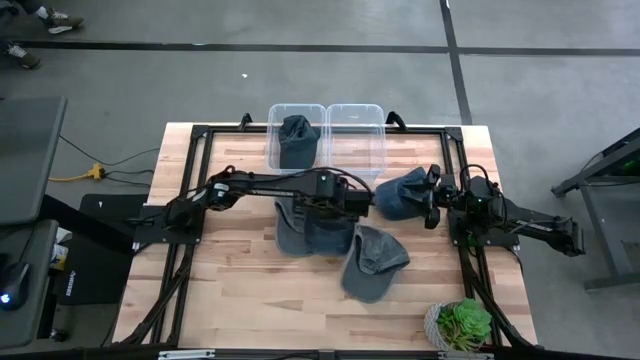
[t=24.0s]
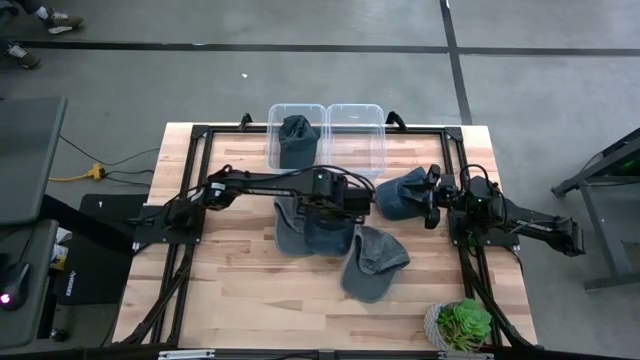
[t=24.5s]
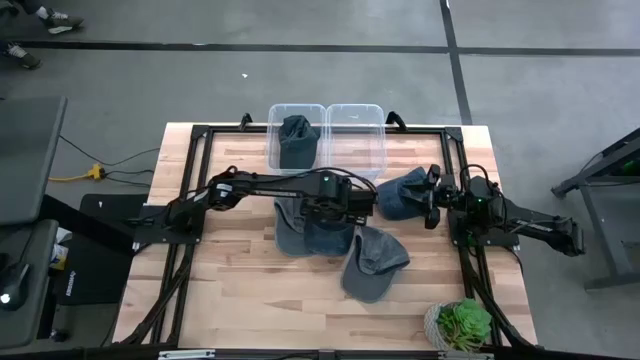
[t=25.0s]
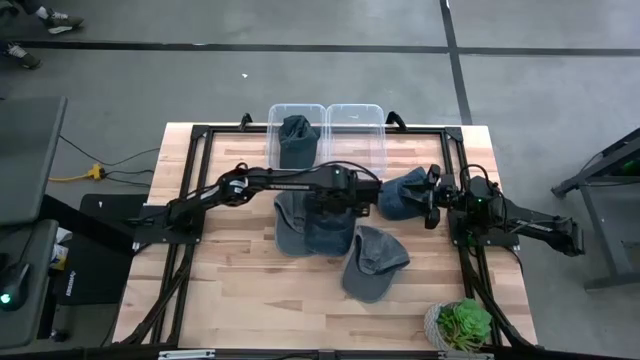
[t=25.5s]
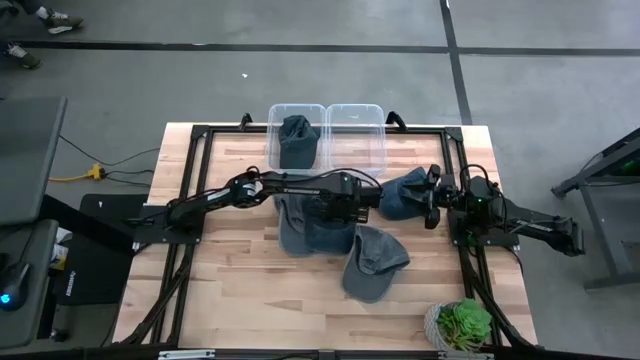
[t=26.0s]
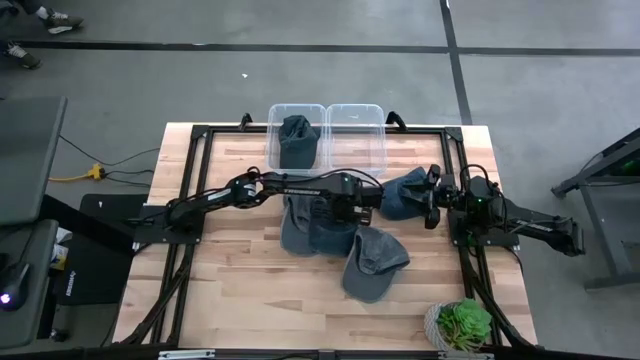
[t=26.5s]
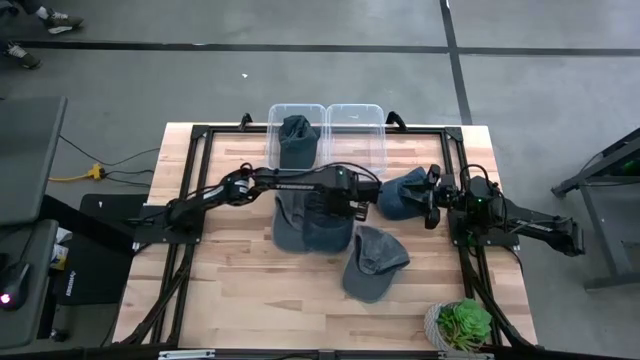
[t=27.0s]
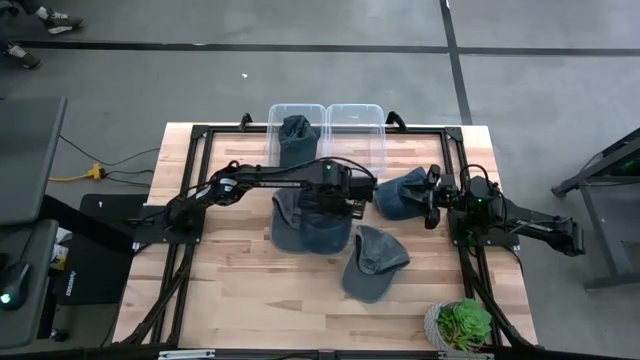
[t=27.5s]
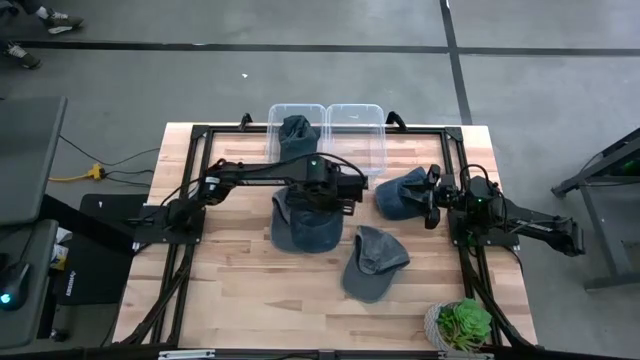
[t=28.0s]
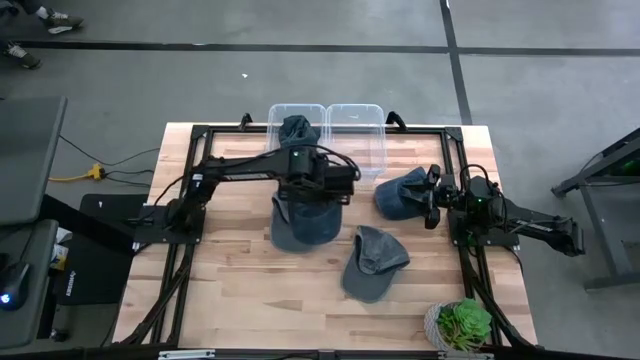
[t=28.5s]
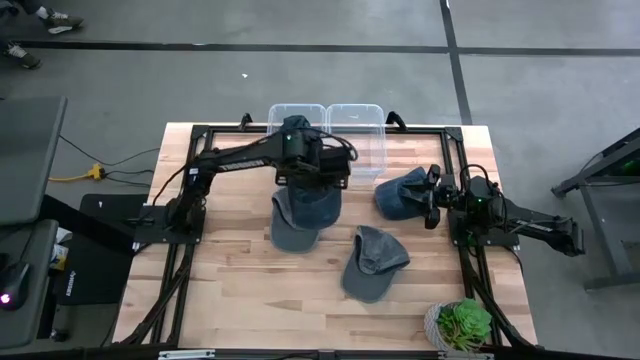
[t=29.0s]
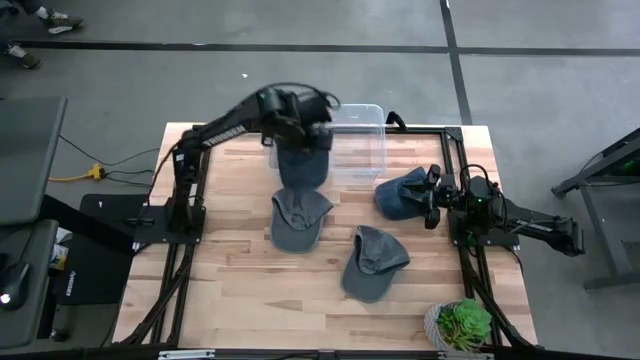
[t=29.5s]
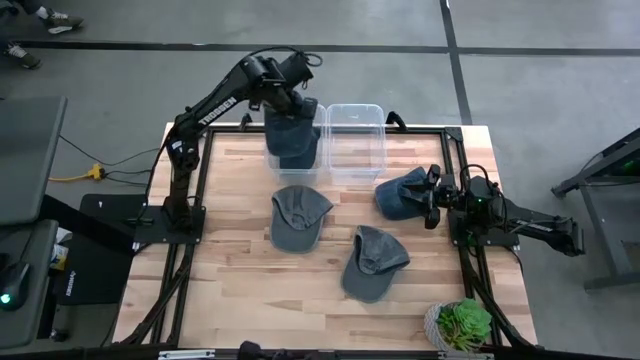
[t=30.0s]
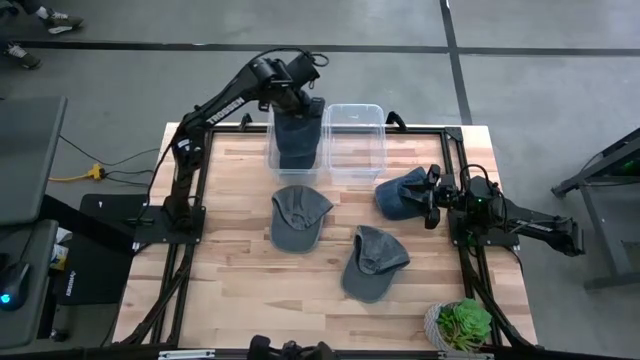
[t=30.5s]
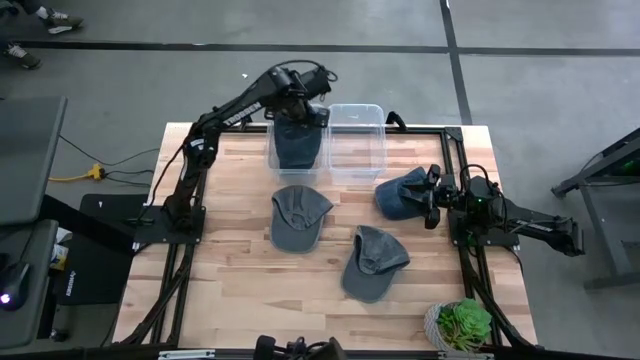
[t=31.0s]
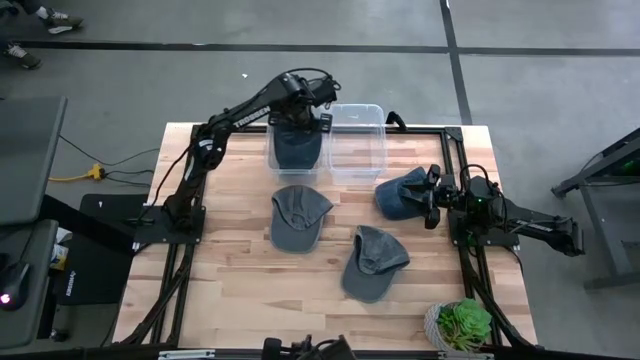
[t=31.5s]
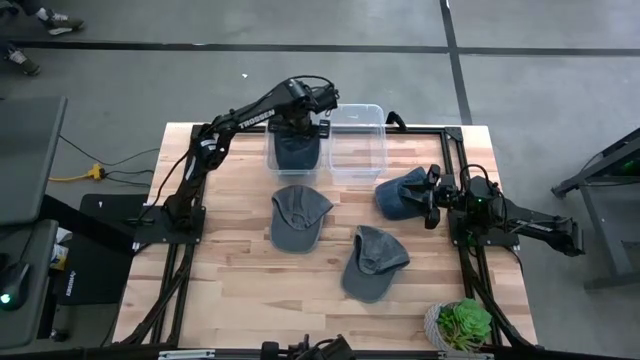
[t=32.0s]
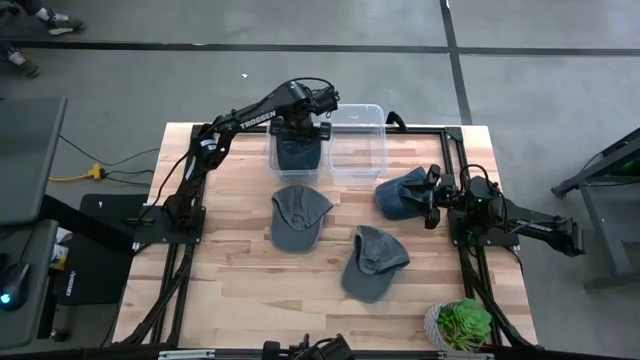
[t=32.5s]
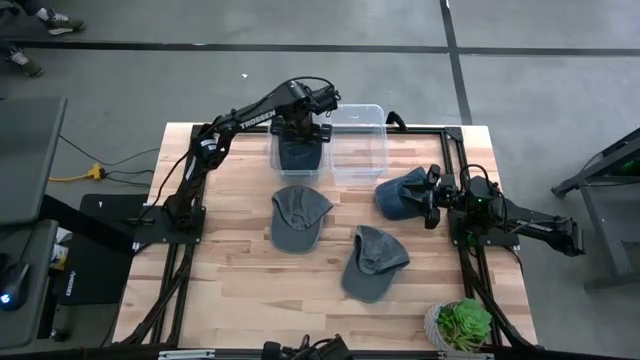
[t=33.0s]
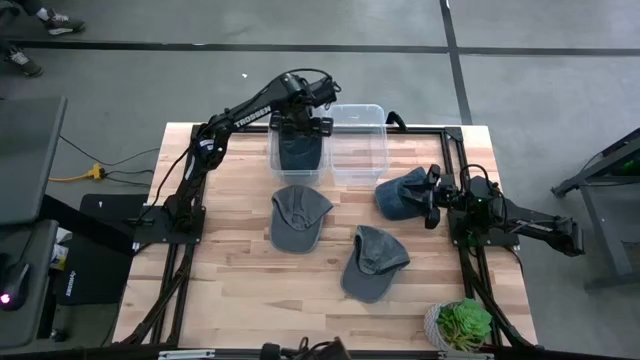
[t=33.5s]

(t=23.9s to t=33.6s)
Task: Pick & Place hat
Put the left blue cap into the left transparent bin

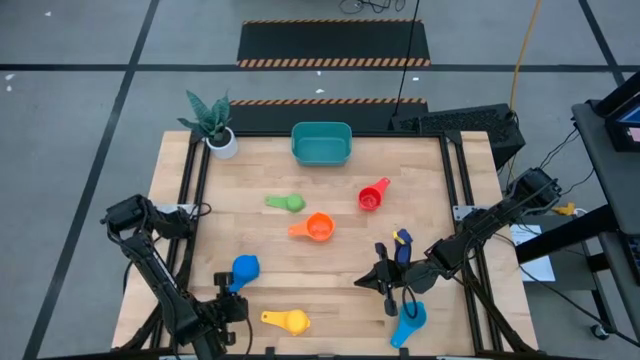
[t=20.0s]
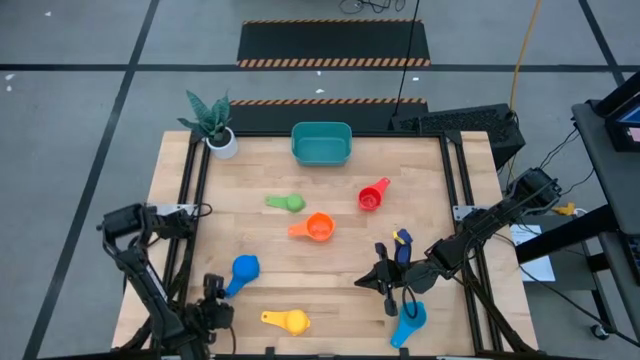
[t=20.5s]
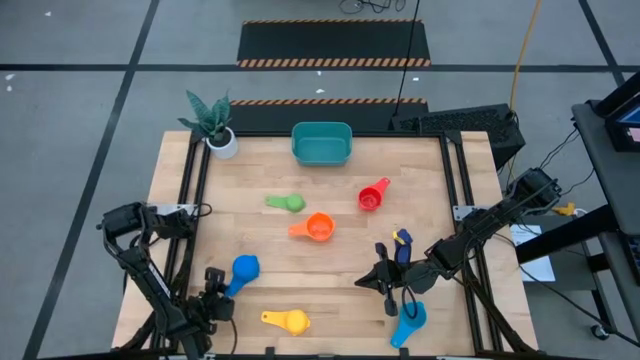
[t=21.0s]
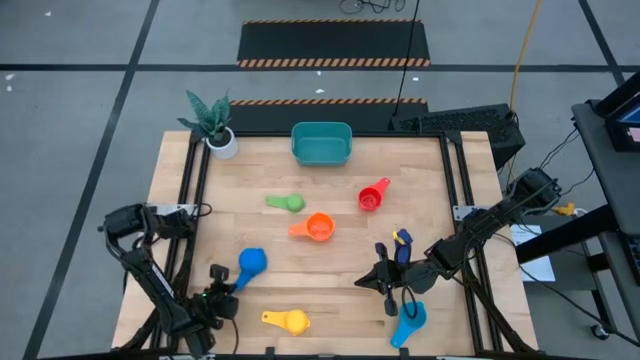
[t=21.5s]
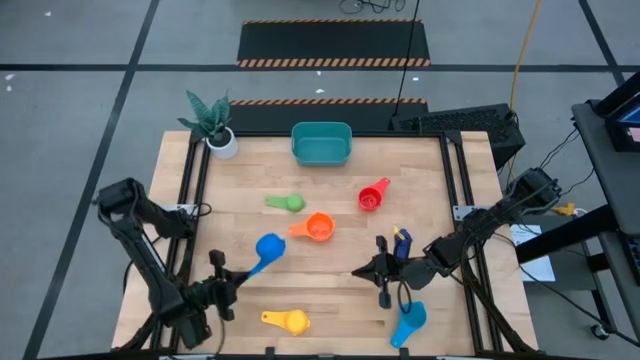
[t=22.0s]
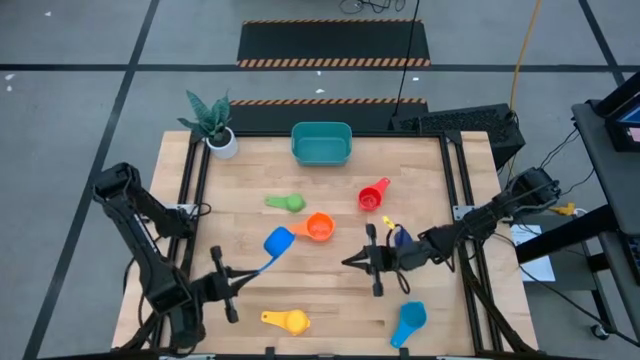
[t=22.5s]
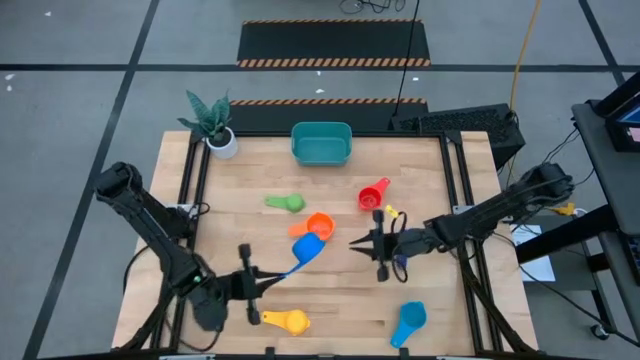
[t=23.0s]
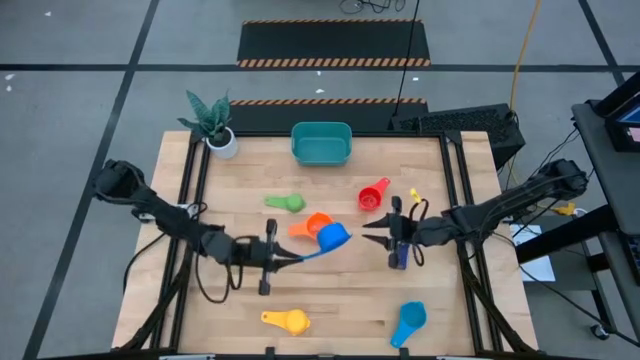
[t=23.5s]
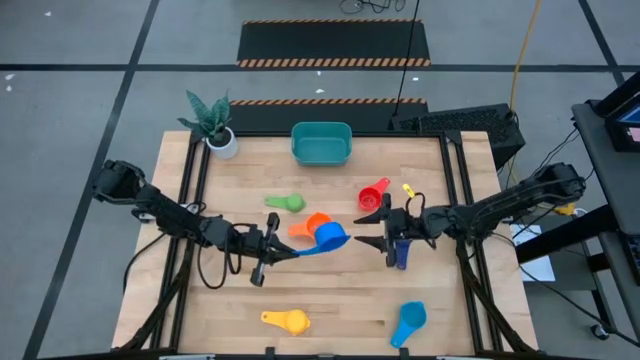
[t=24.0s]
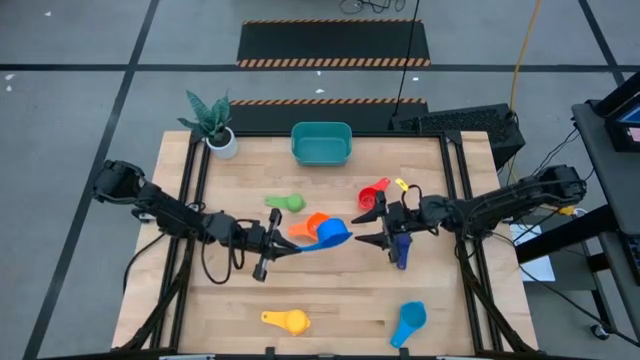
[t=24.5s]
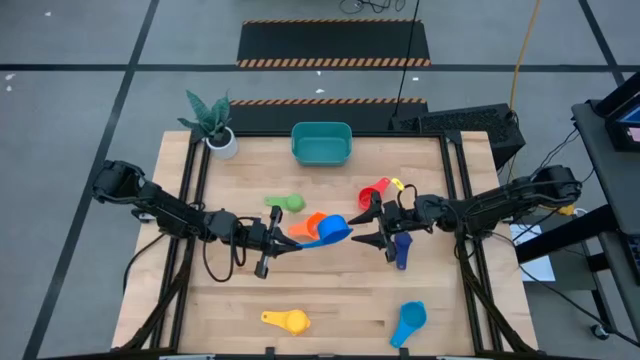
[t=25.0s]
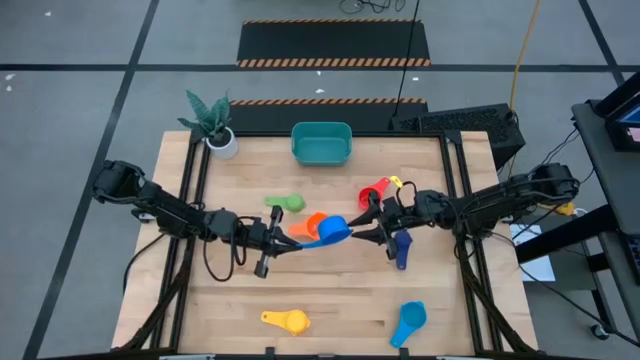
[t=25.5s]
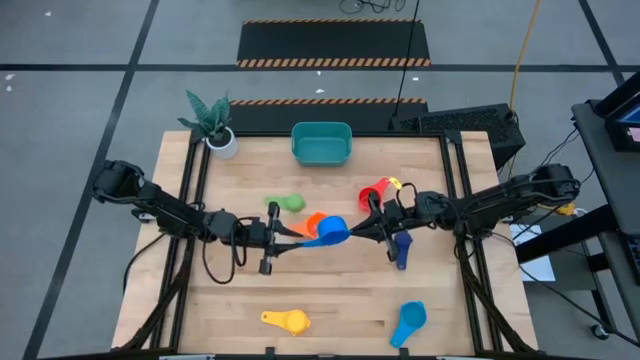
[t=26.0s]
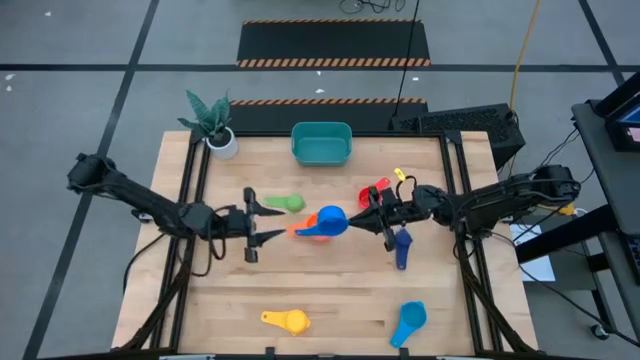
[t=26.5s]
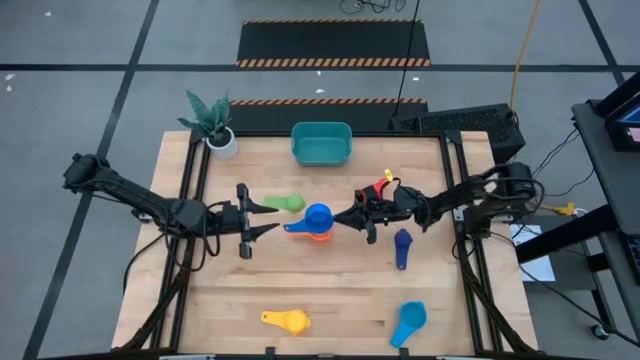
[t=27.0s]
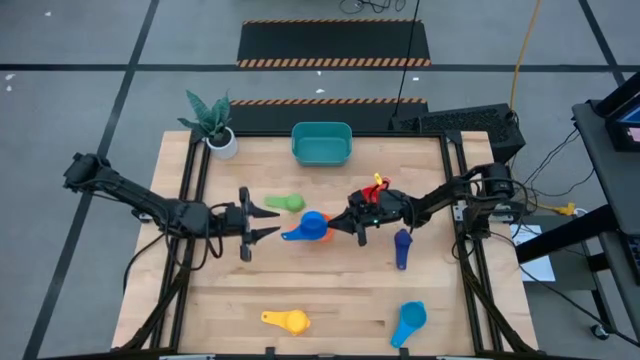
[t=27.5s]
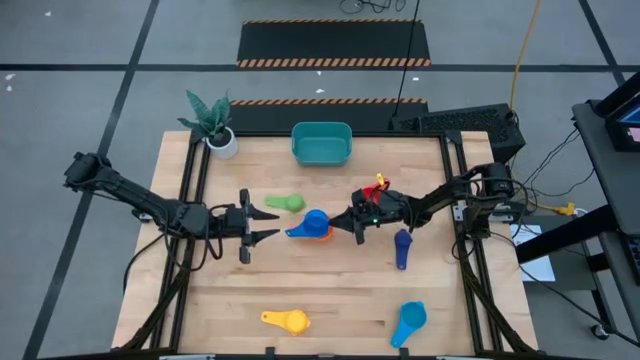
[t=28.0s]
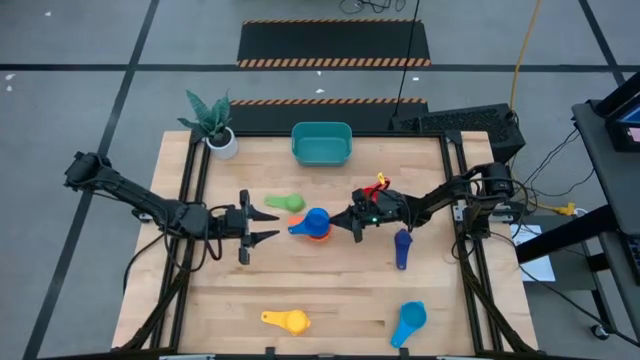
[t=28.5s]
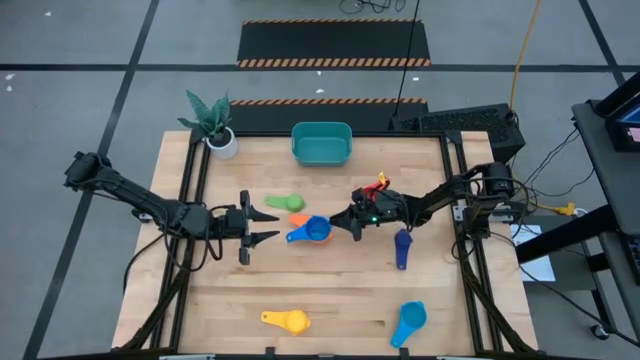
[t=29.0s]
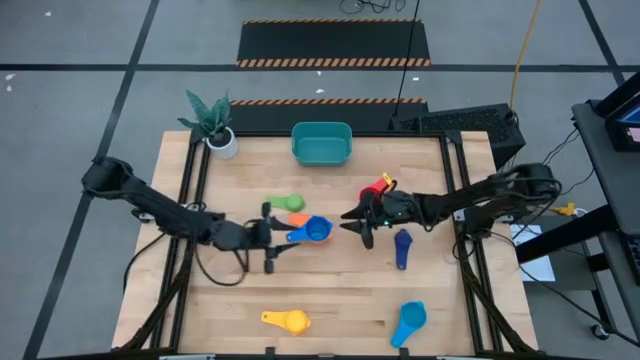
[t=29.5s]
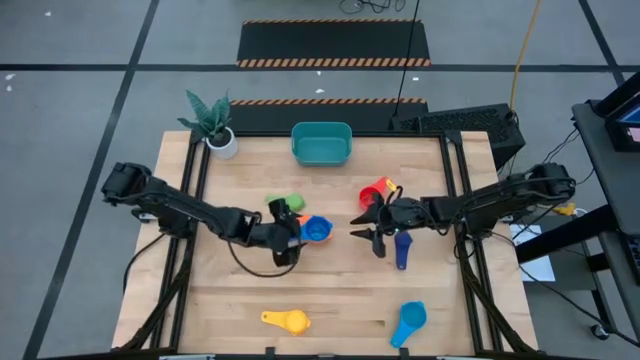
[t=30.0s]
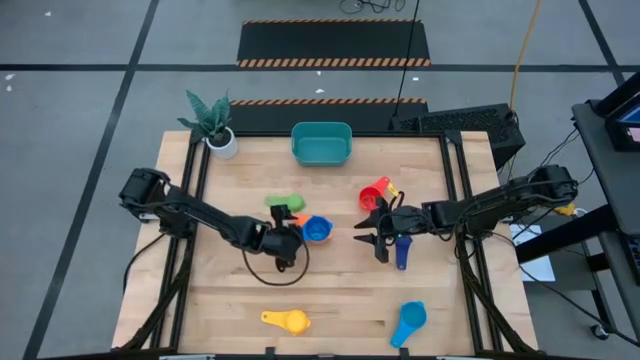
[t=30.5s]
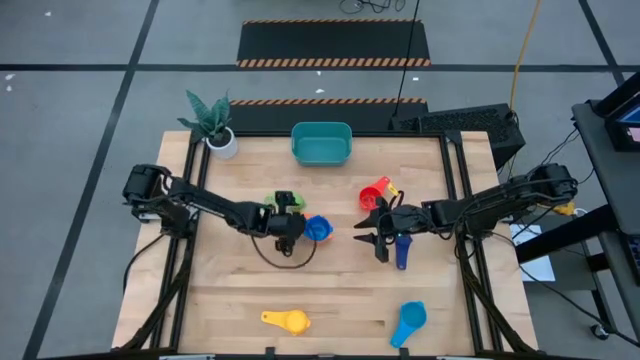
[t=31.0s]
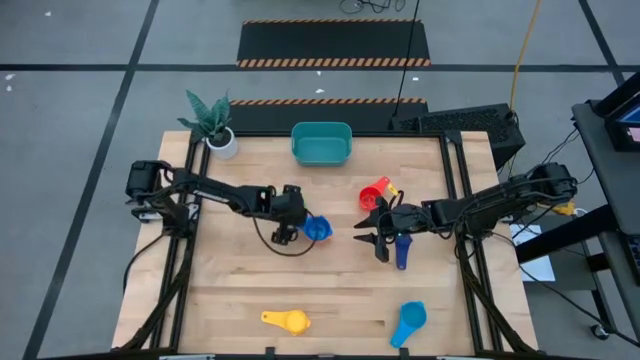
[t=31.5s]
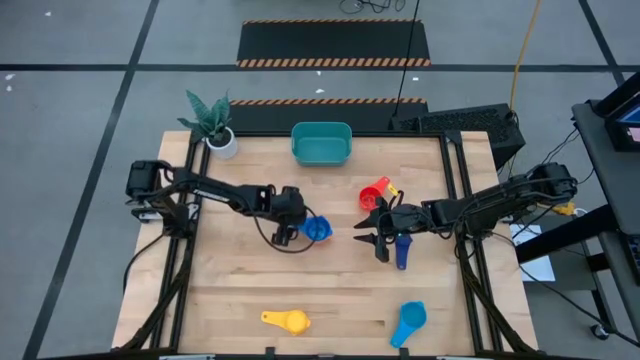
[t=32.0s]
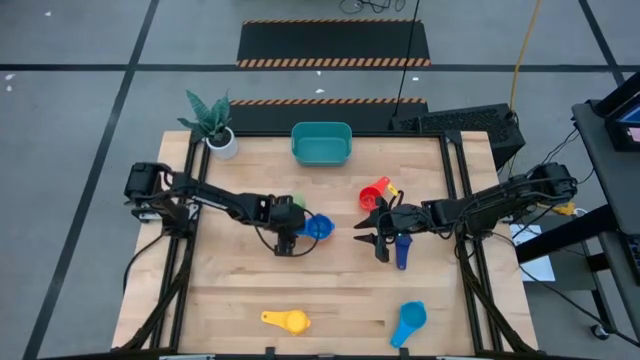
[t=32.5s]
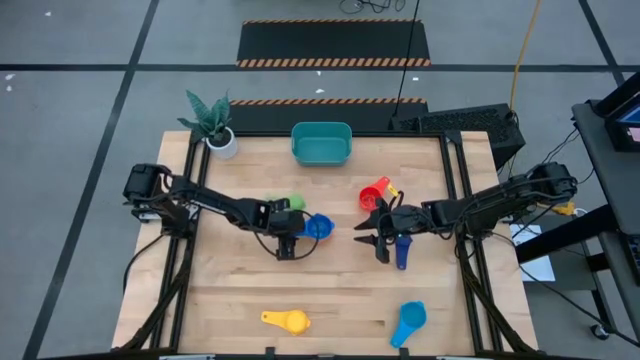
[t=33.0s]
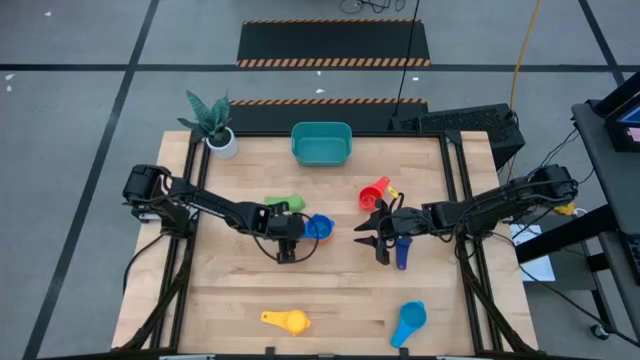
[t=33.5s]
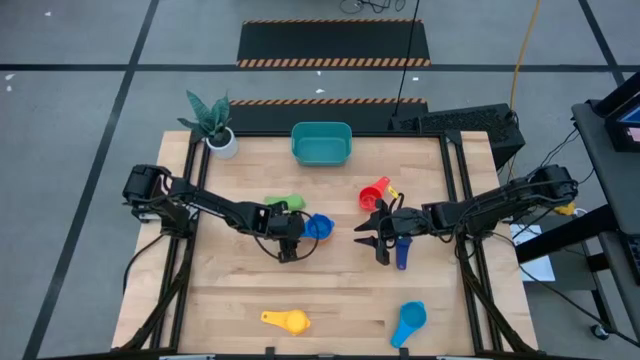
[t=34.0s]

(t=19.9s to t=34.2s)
Task: Nest measuring cups in basket
Stack the blue measuring cup on top of the orange measuring cup
